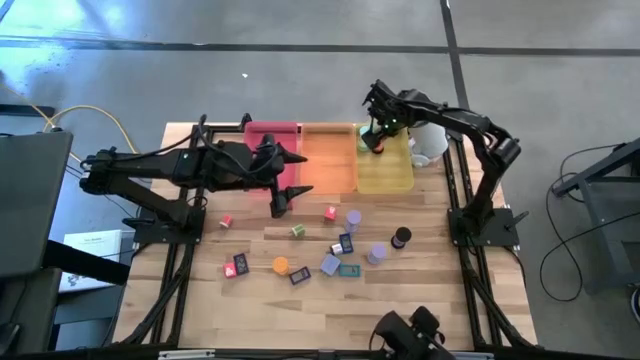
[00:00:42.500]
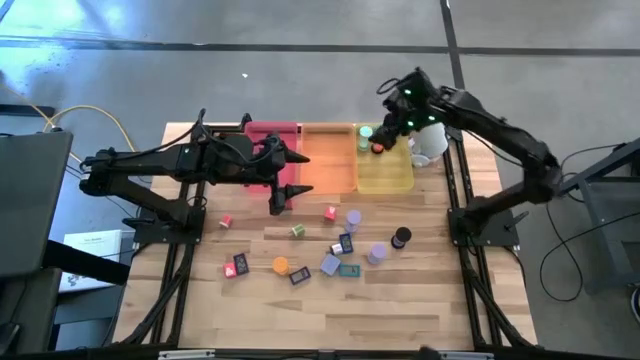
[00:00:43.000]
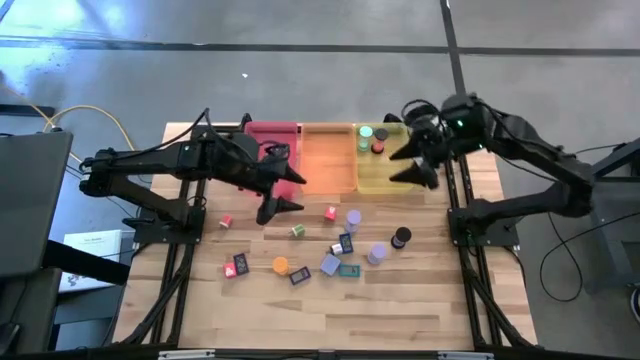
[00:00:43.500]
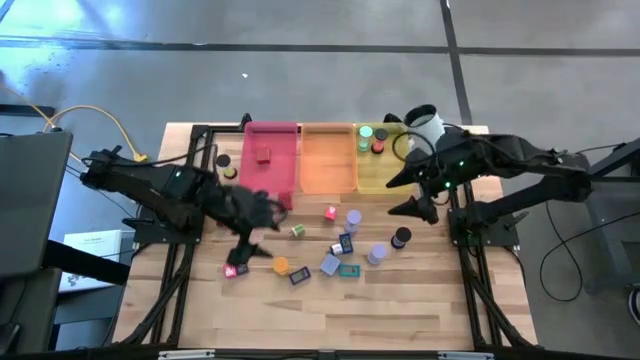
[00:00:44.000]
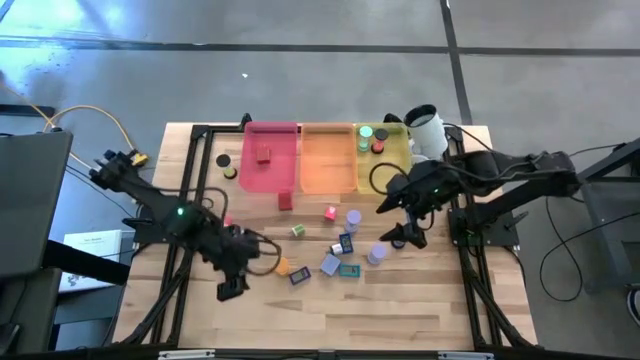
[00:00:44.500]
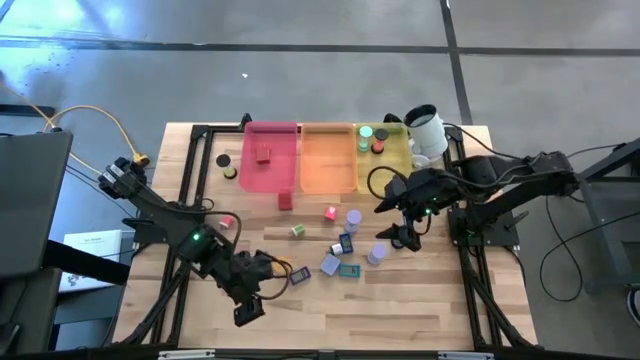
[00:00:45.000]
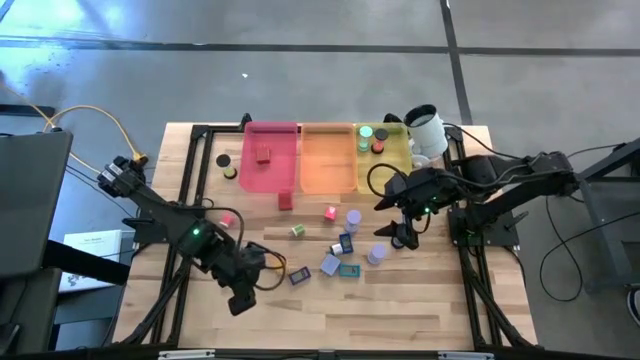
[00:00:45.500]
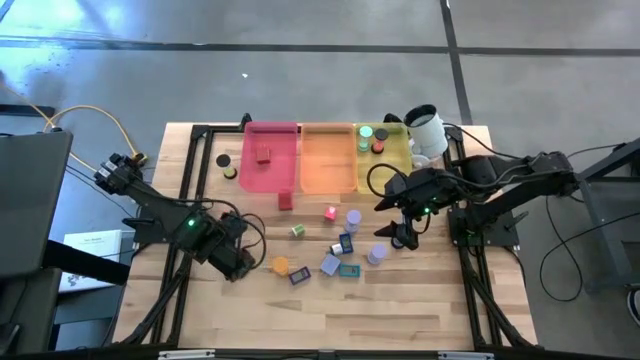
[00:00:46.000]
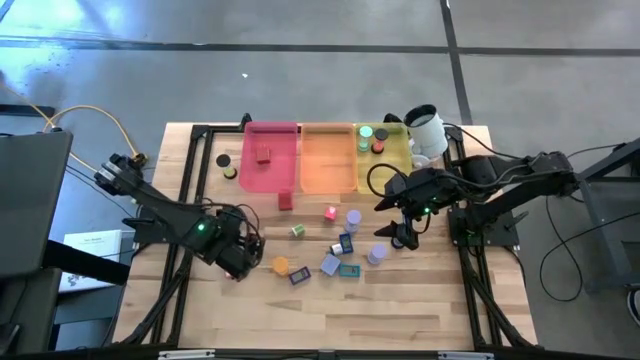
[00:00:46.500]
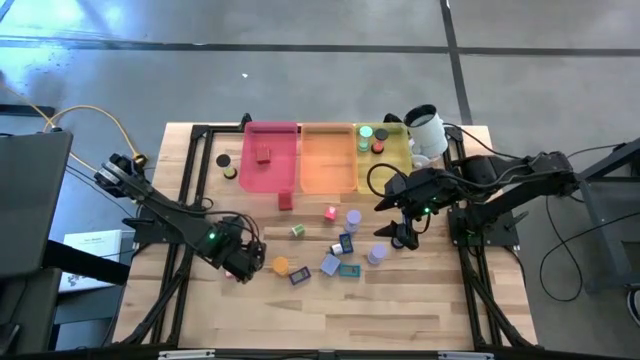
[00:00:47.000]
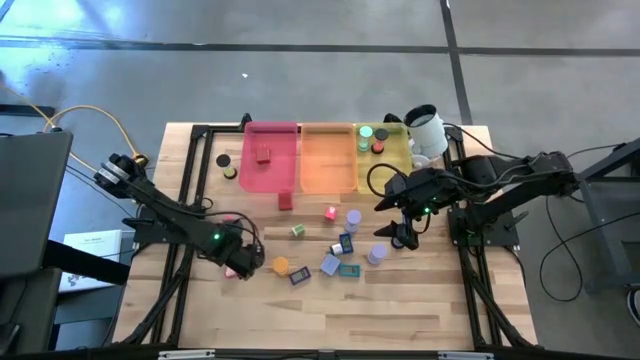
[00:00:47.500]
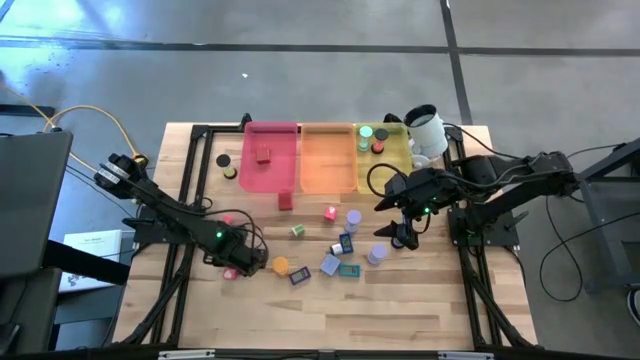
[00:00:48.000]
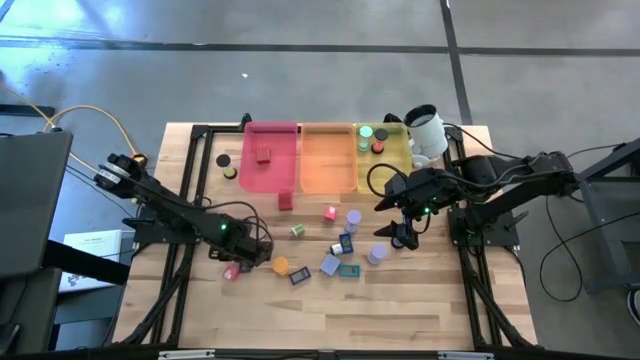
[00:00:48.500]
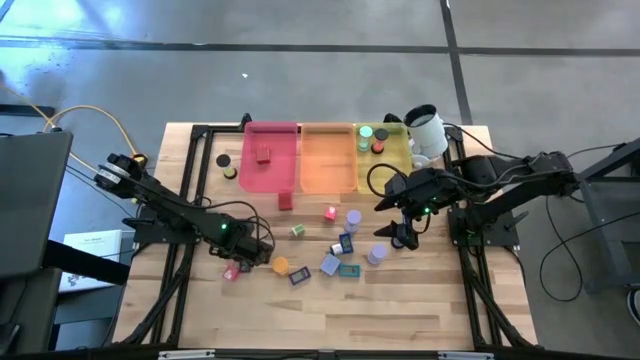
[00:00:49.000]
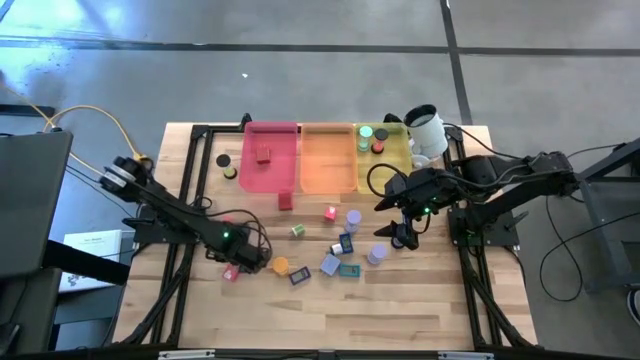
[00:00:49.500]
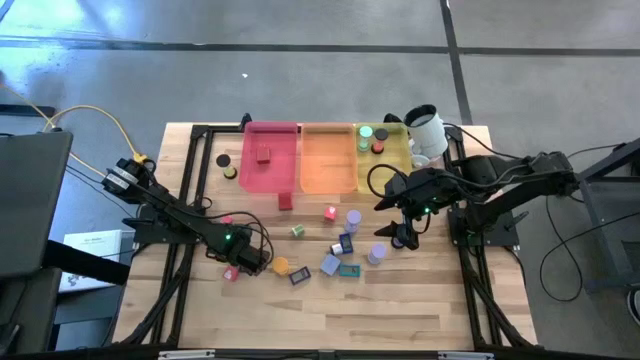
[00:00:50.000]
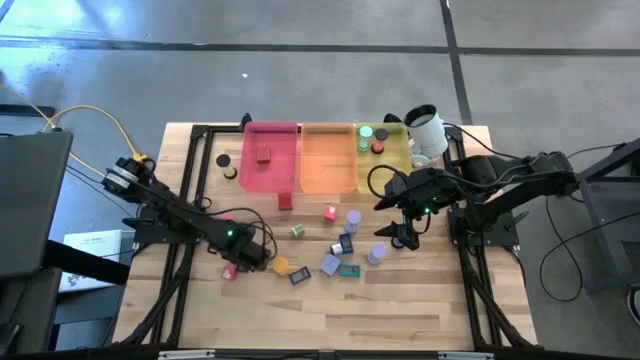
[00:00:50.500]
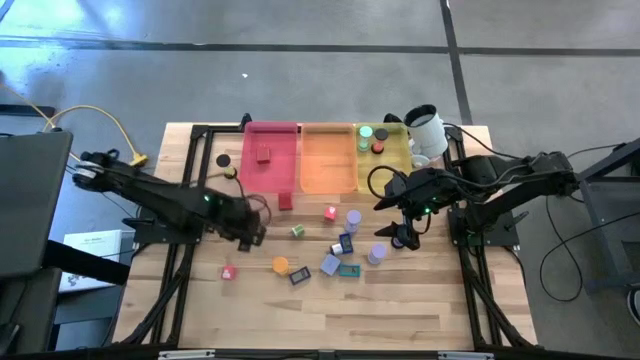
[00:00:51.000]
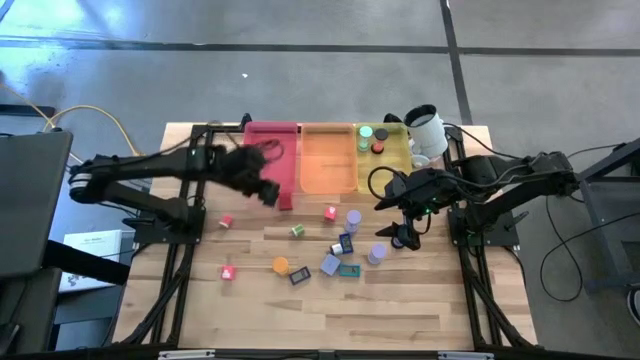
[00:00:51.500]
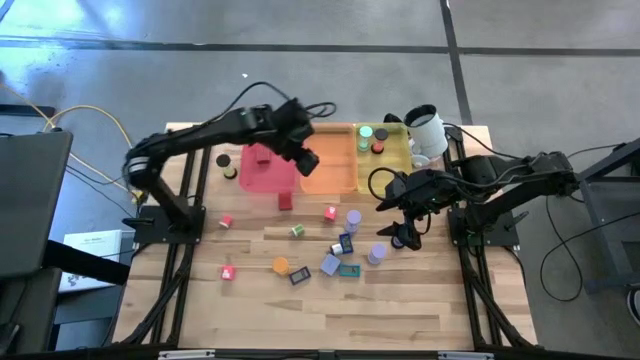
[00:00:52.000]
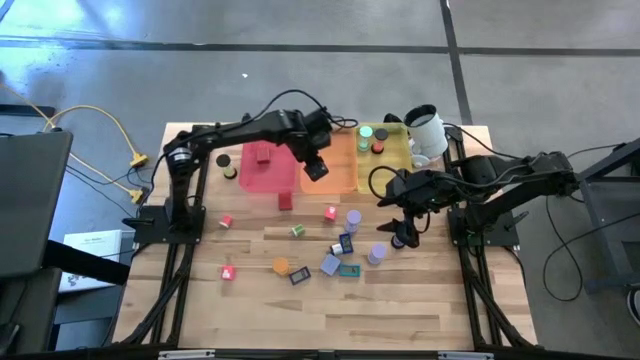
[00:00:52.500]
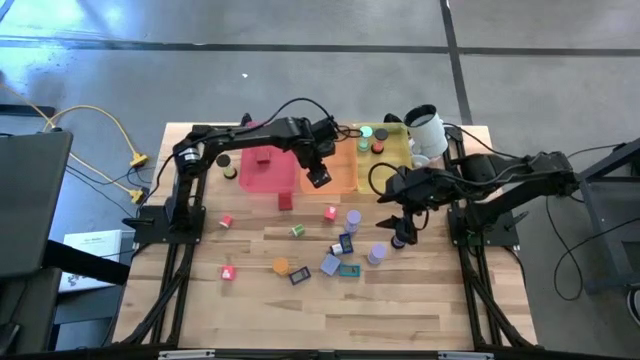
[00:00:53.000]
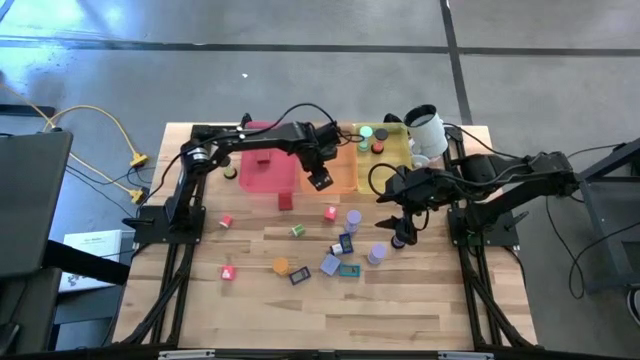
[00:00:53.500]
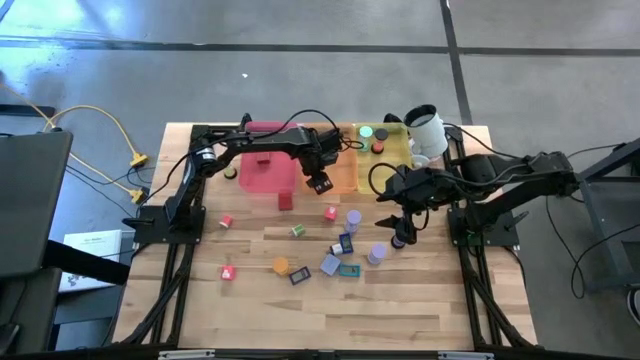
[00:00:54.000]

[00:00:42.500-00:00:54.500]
Task: Pick & Place Office items
Put the left dark blue digital clock into the orange bin

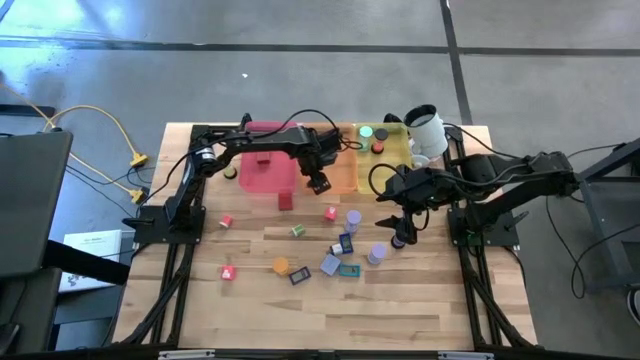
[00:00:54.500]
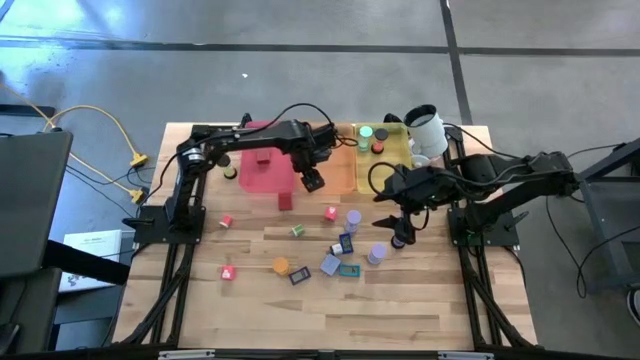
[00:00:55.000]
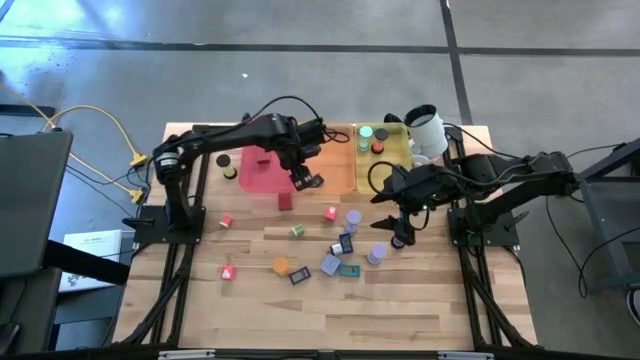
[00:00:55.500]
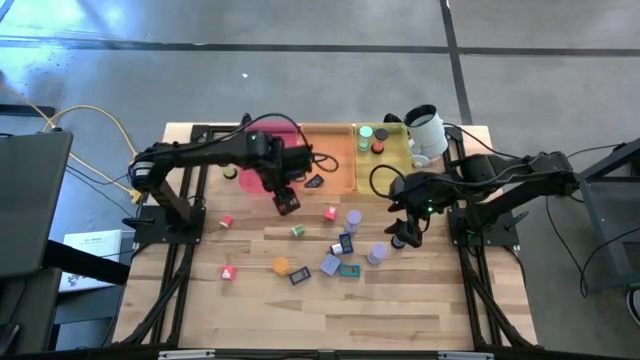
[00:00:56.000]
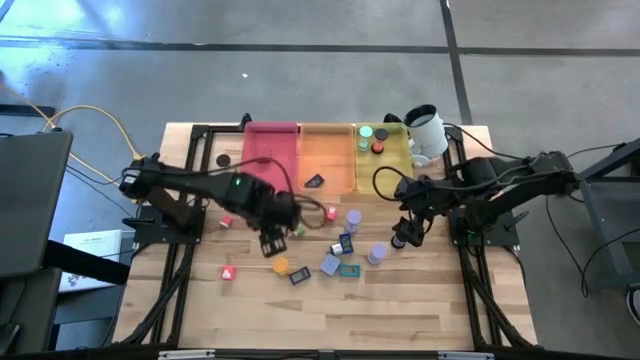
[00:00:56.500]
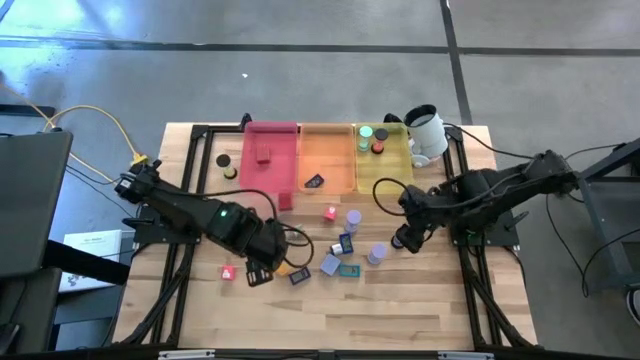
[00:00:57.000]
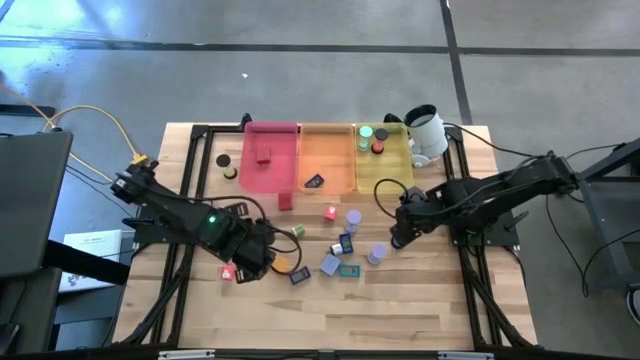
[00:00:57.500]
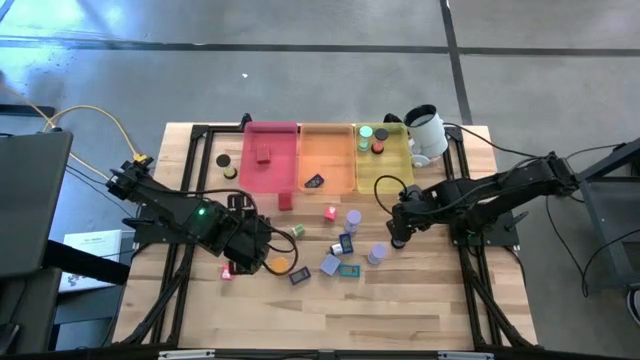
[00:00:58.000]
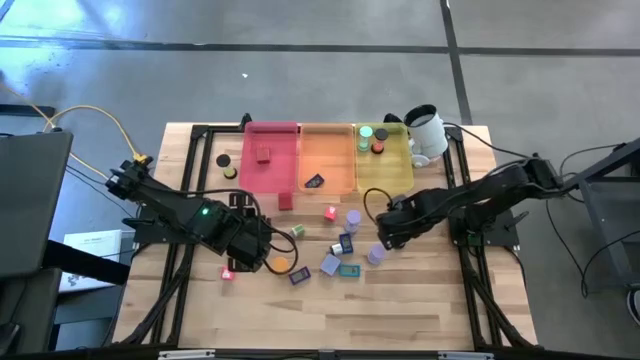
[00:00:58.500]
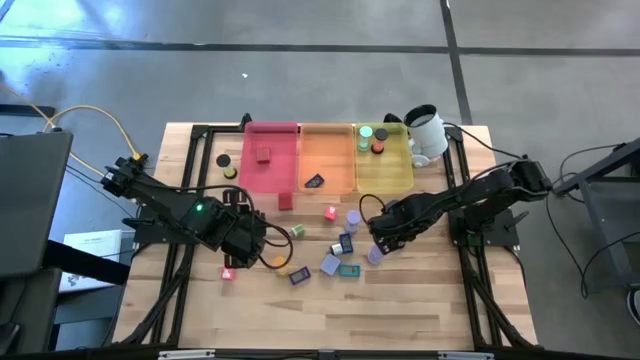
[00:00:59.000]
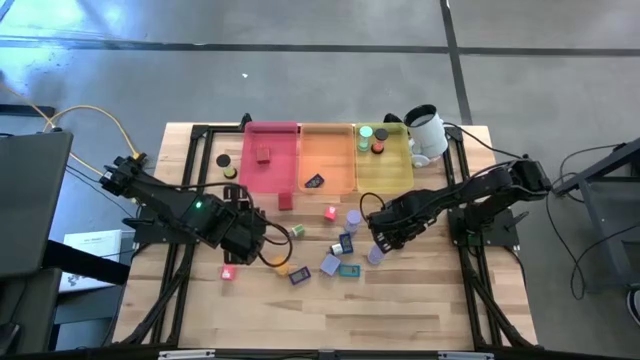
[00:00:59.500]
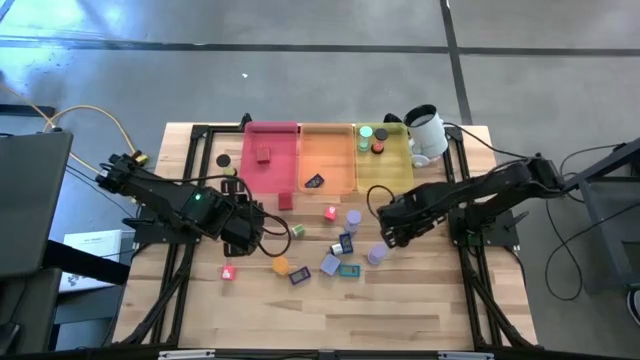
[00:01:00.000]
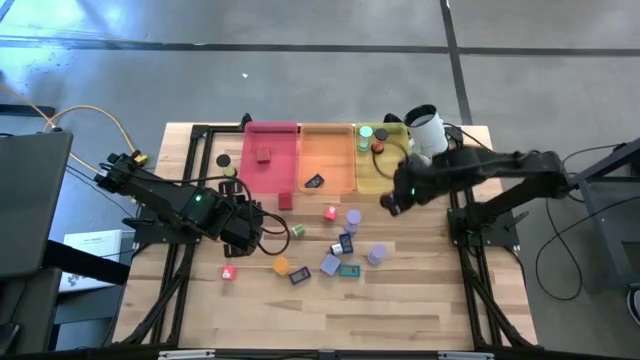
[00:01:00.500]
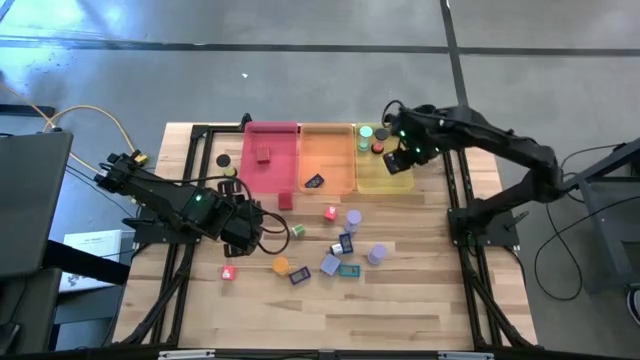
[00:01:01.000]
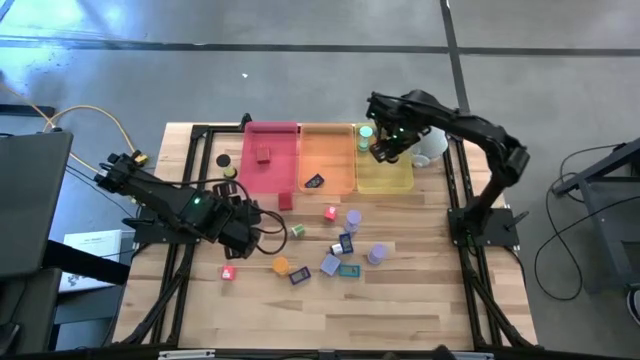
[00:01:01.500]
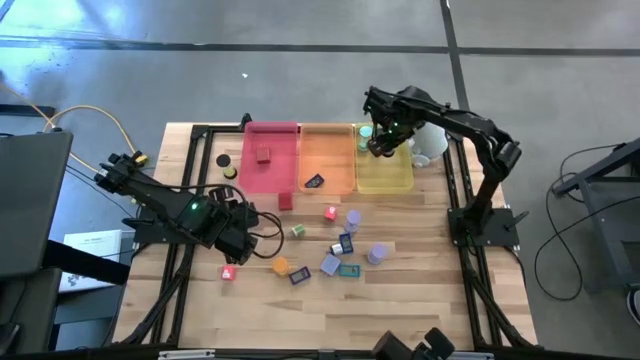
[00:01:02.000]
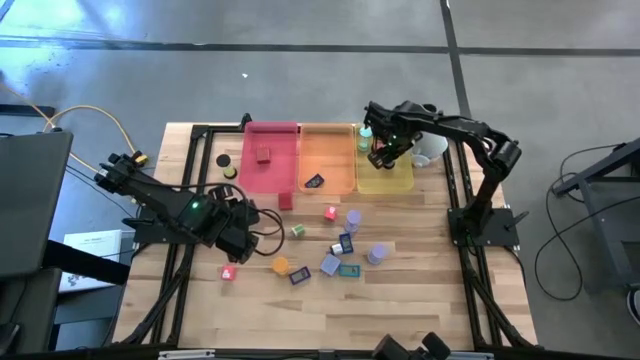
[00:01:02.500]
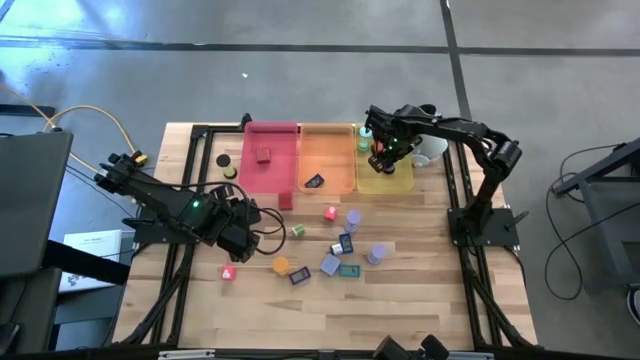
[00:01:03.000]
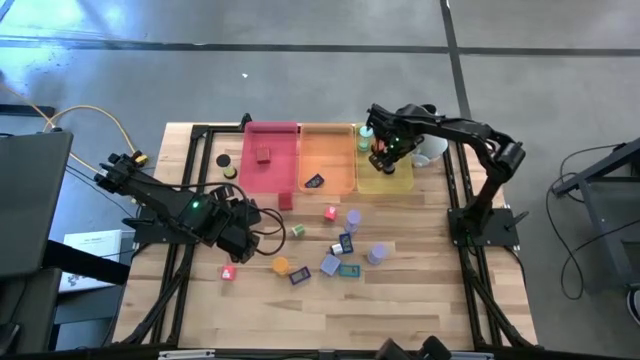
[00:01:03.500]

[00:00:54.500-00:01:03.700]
Put the right black hourglass into the yellow bin

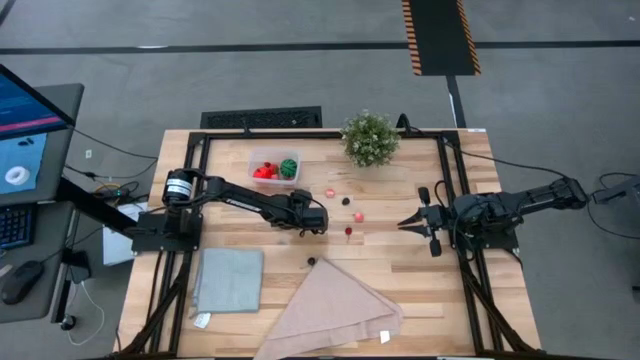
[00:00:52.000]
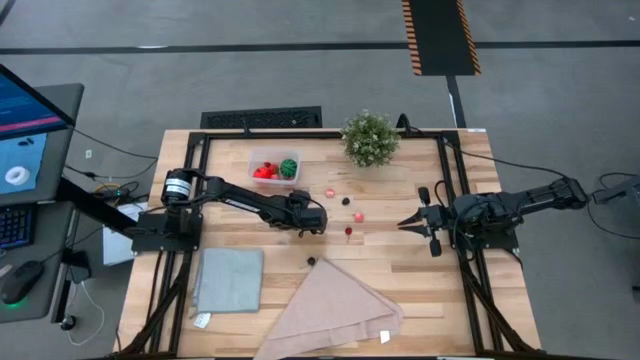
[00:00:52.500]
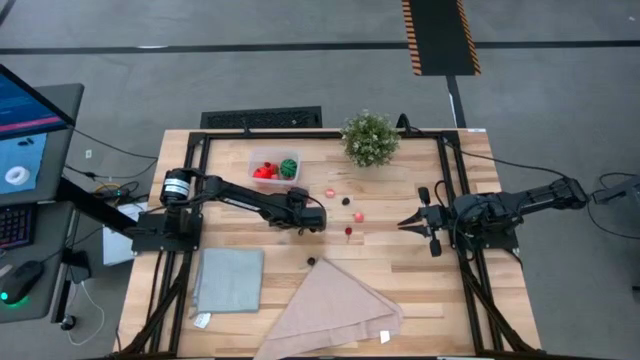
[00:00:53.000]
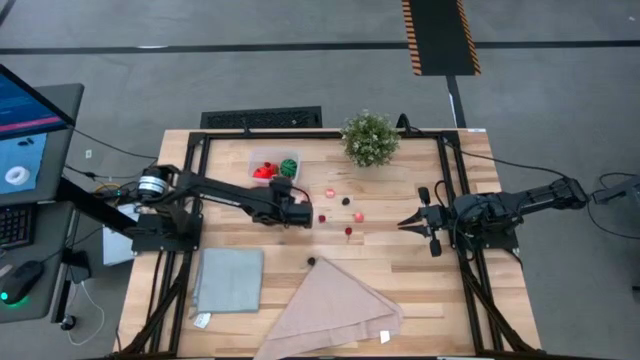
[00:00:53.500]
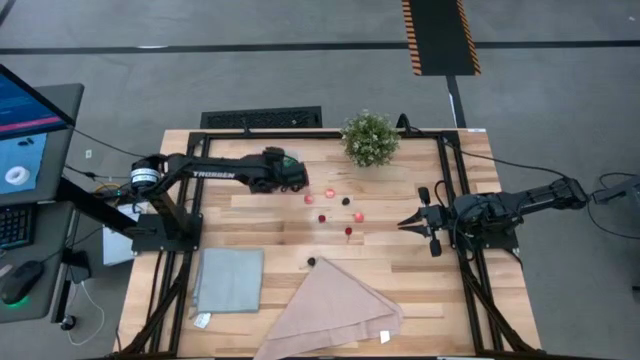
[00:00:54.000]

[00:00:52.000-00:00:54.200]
Task: Pick and placing Produce into tupperware
Put the blueberry into the transparent container
